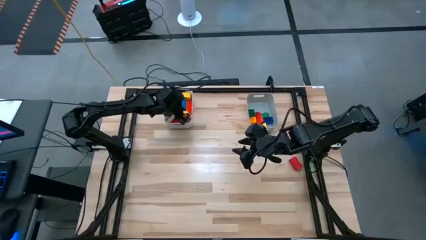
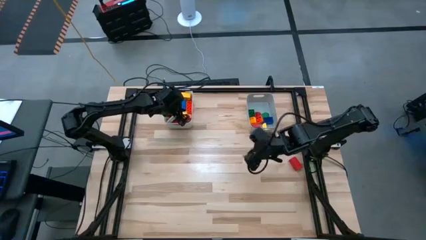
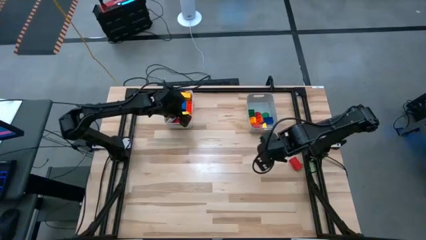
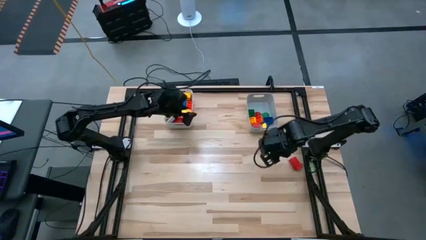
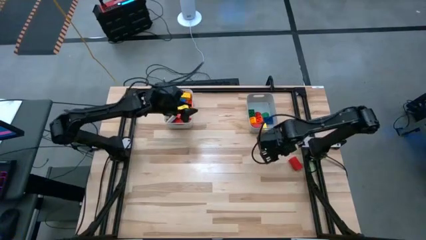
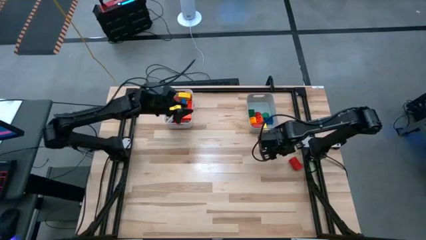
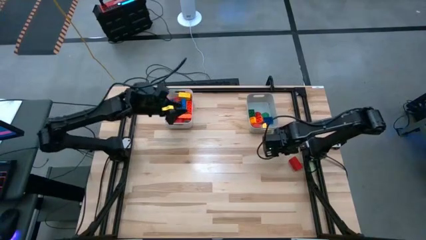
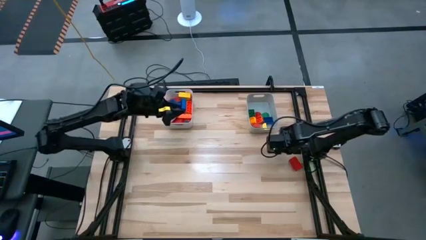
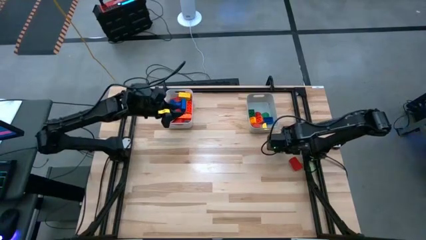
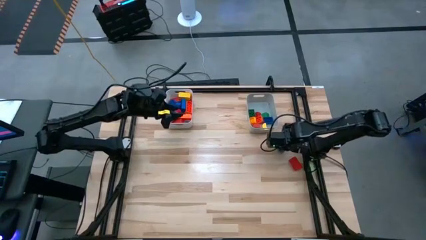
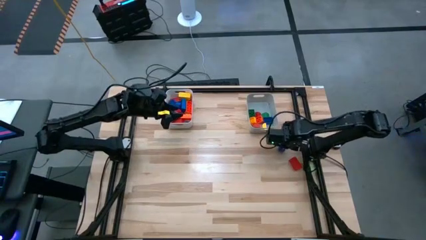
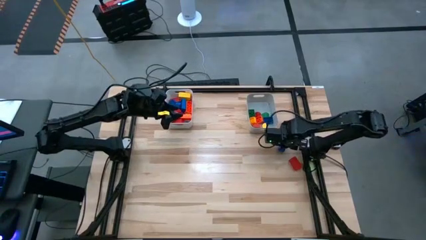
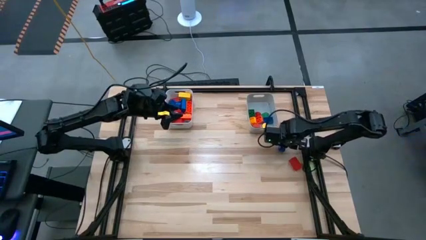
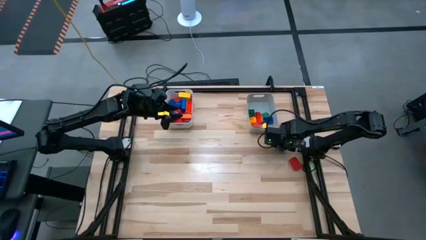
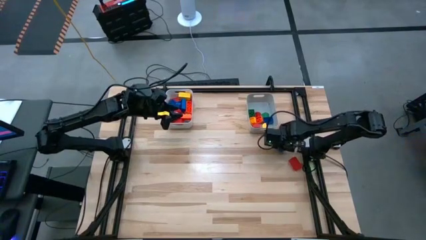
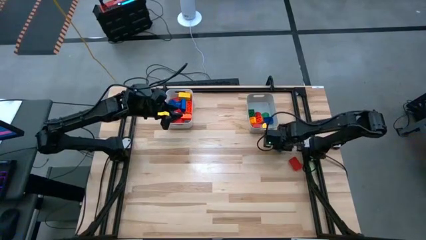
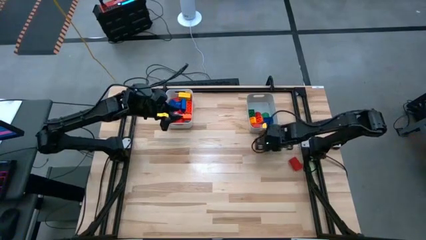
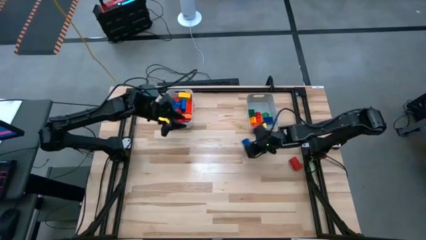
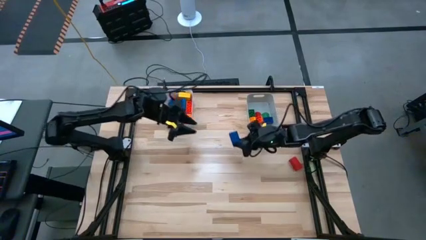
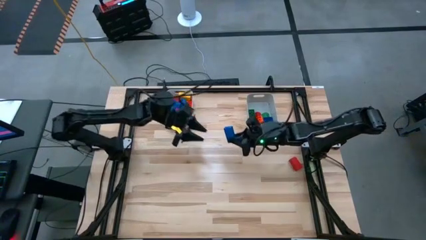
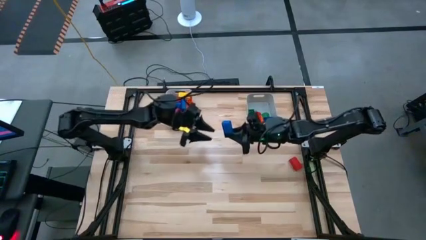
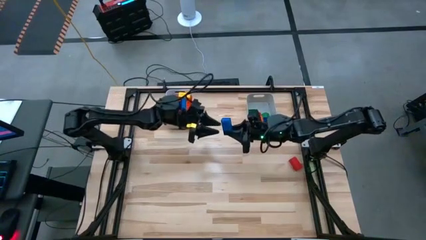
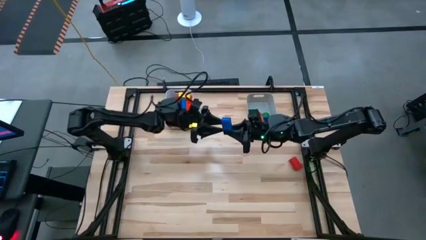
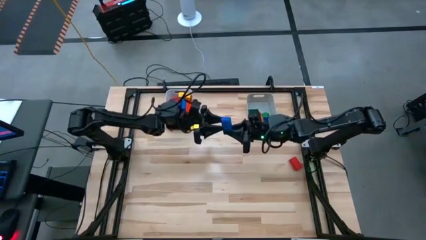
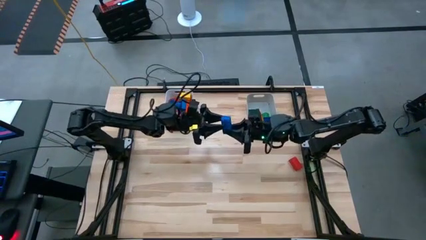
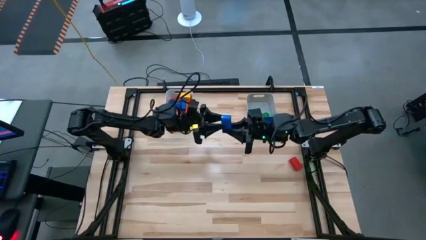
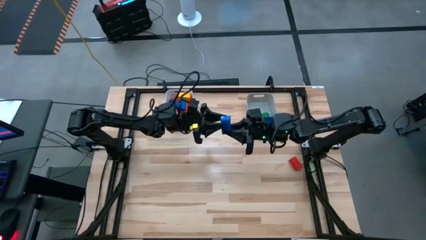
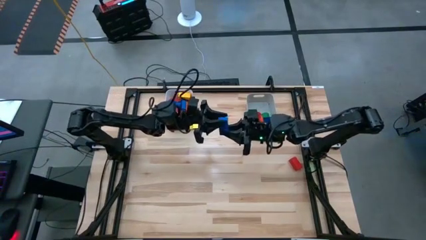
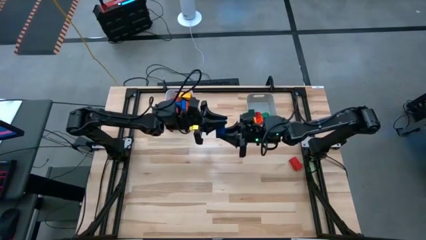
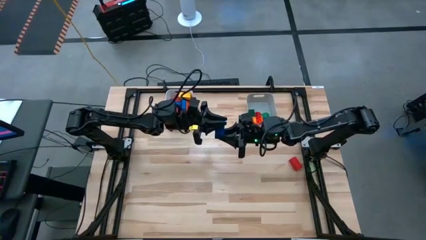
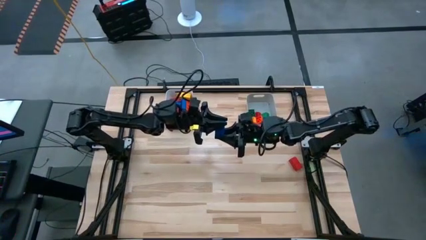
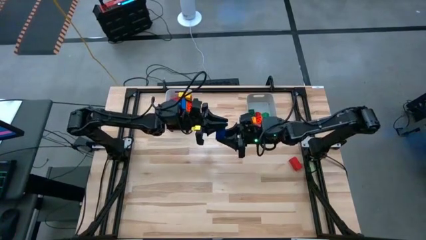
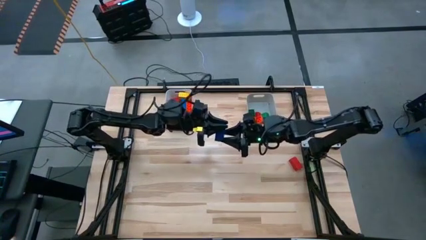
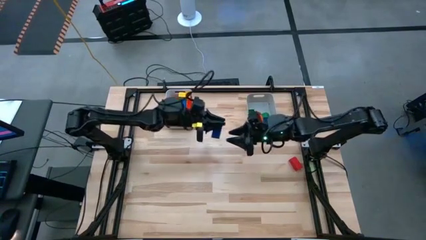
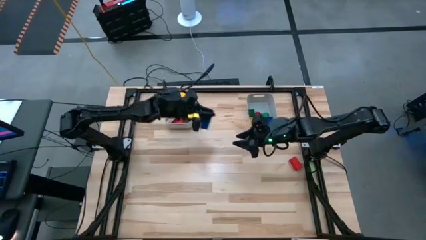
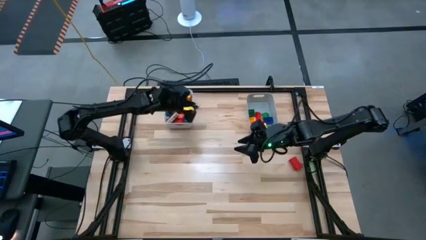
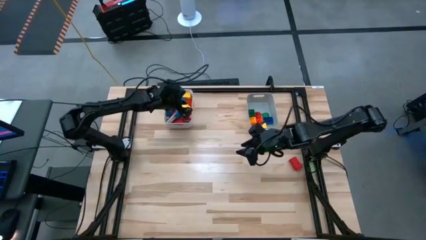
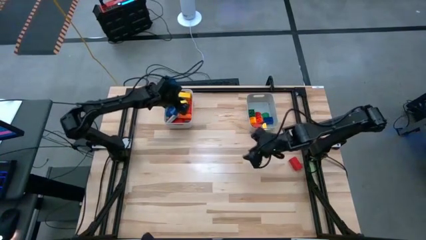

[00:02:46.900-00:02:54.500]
Task: Sort blocks by size
Put the blue rectangle game piece into the white bin

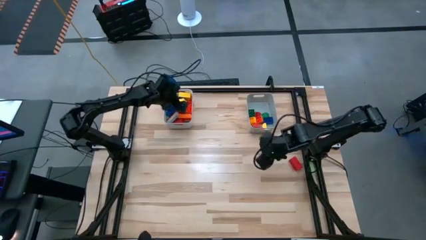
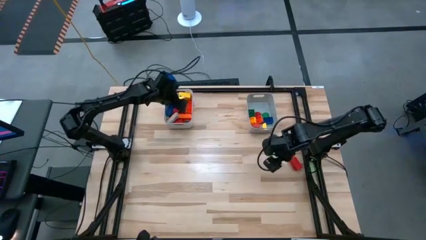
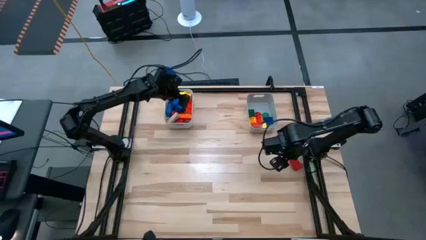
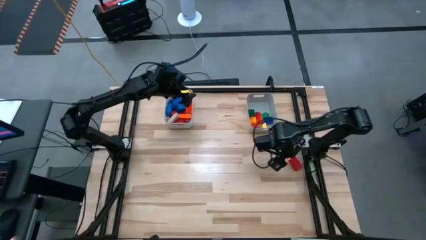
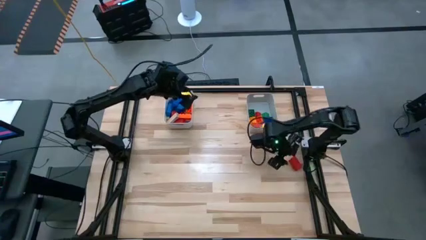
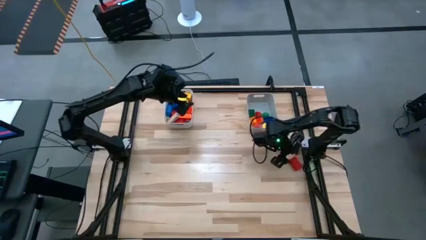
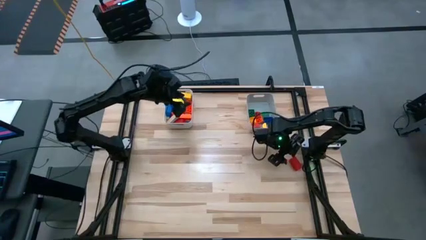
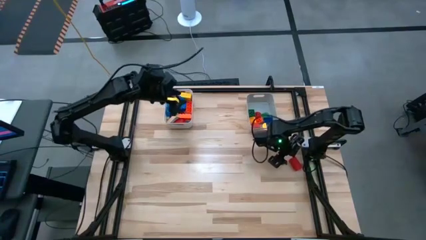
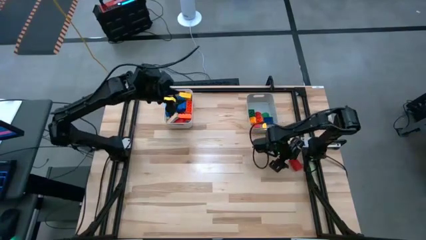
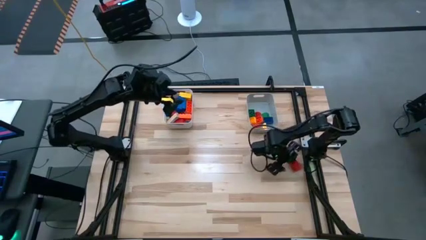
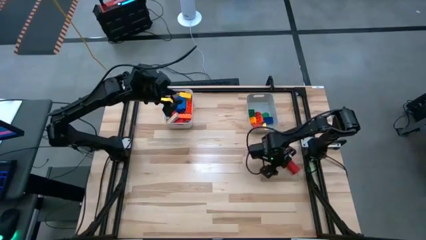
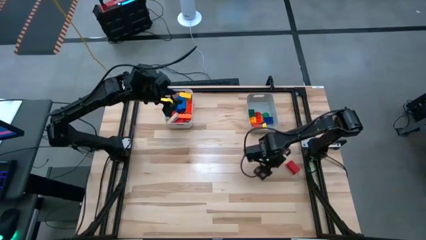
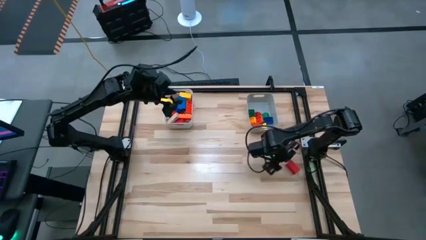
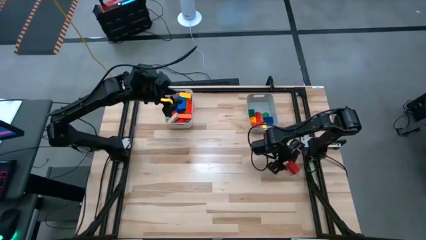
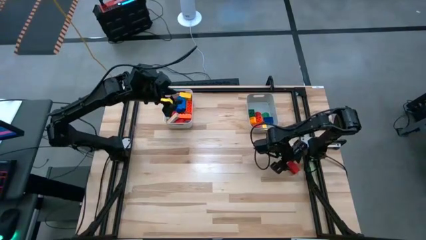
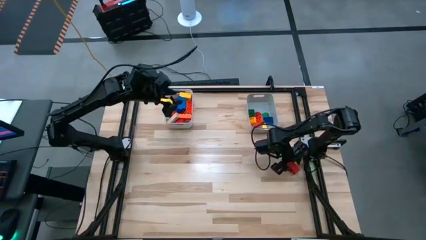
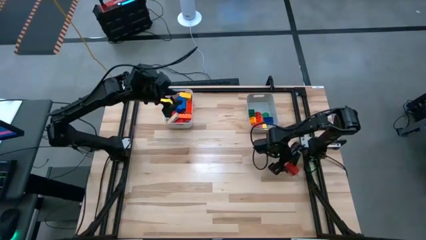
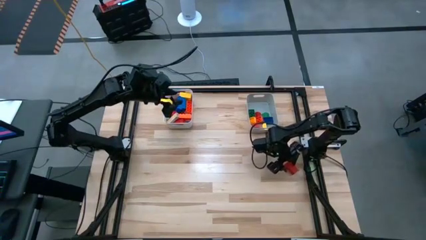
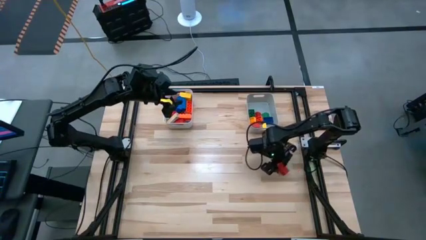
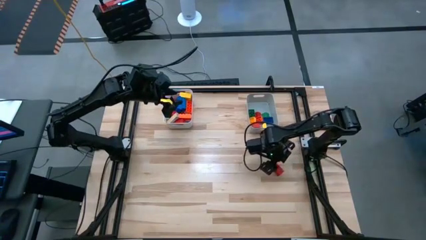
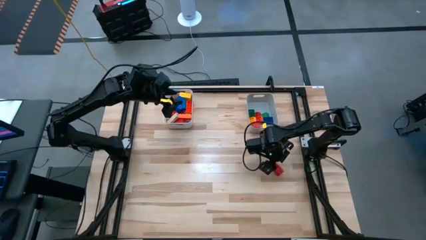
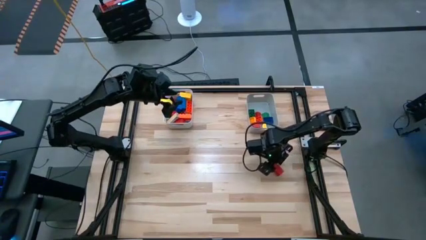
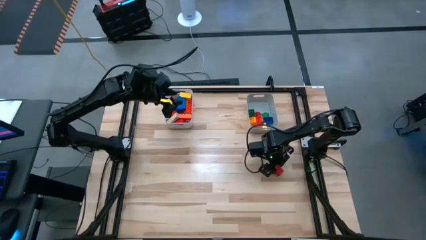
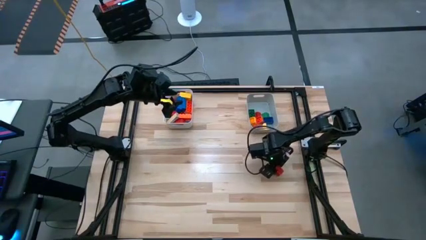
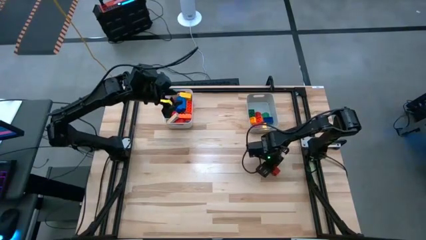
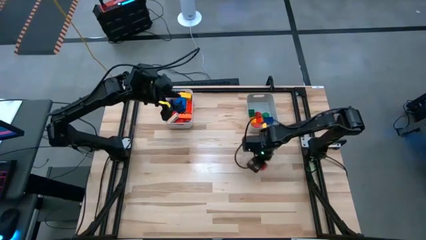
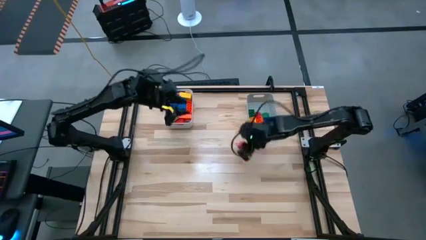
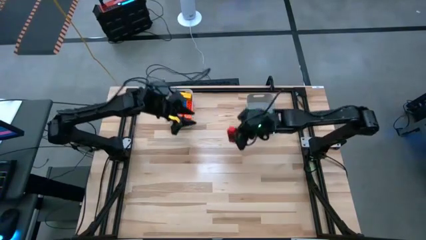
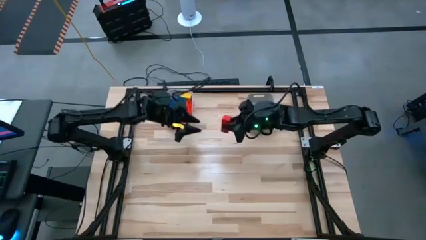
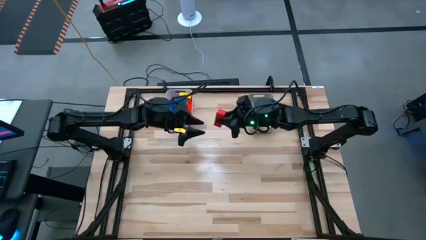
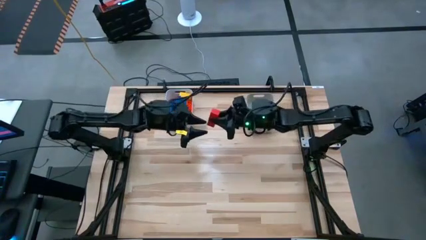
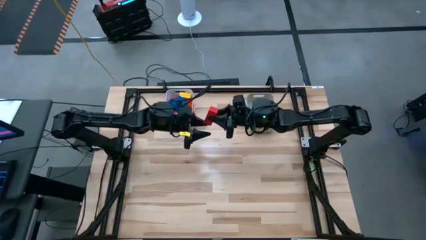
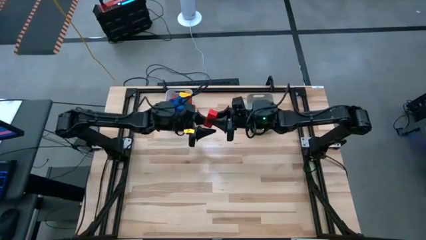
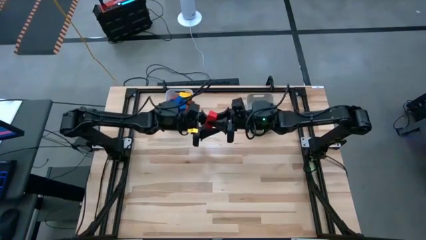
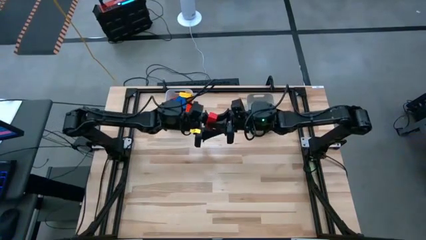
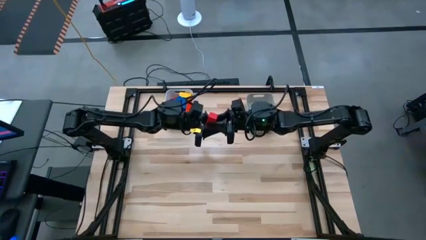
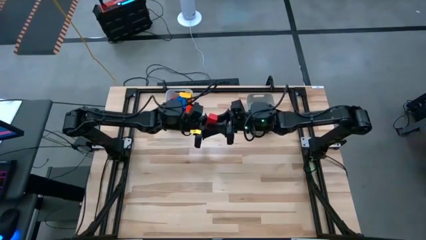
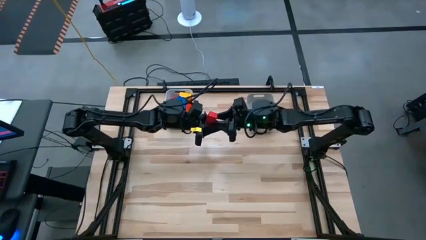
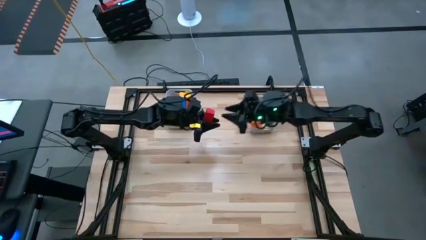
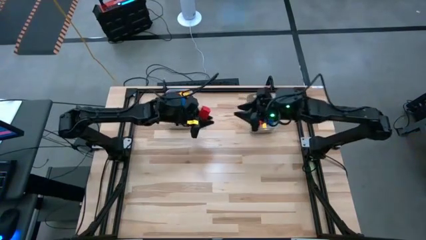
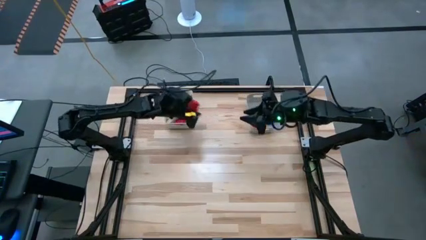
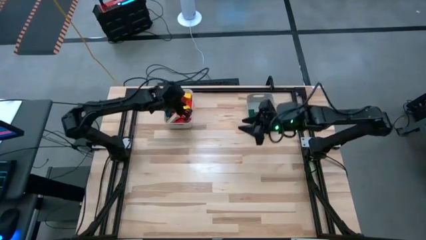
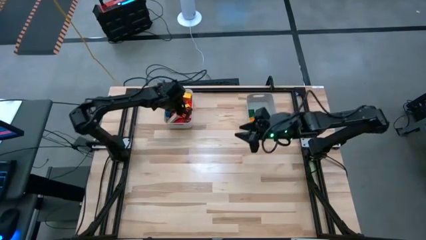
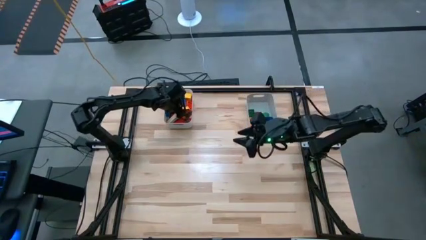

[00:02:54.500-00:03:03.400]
Put the red rectangle block into the white bin

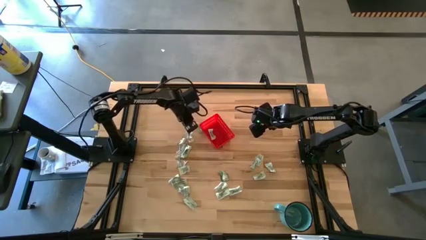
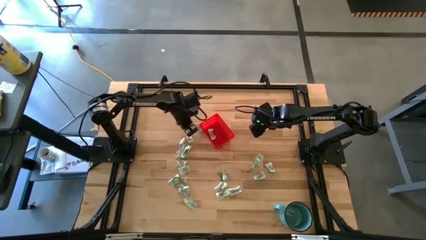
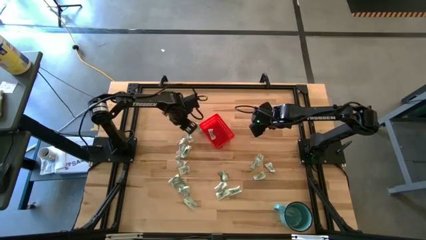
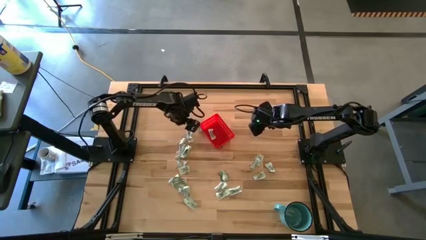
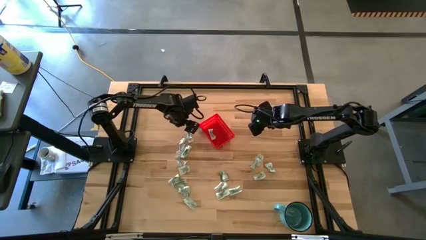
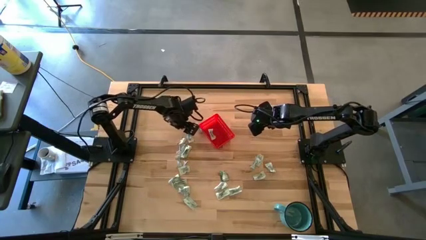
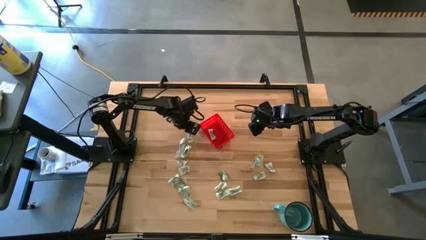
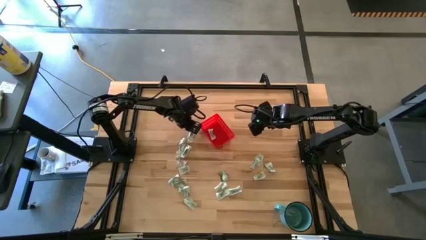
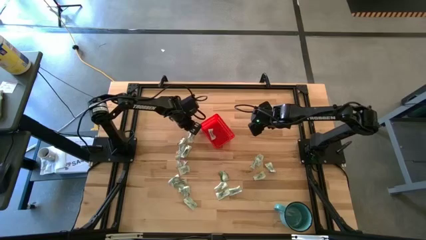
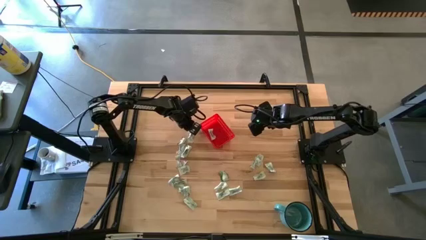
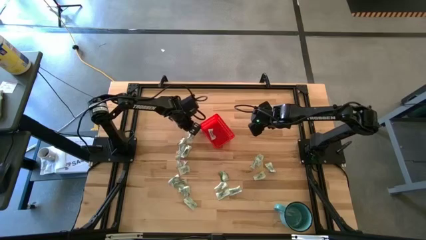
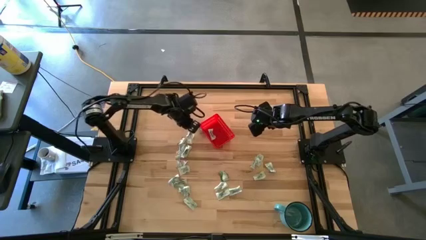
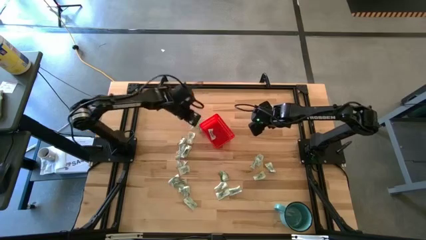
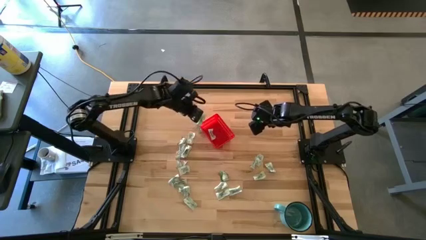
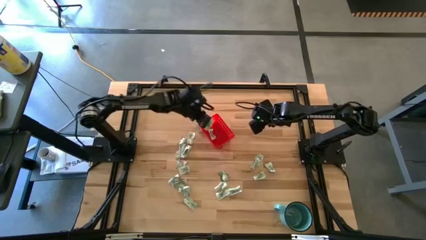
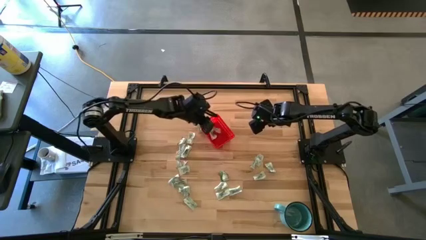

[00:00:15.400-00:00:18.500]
Task: Pick and place Stevia / Truvia into bins
Put the stevia packet into the red basket
